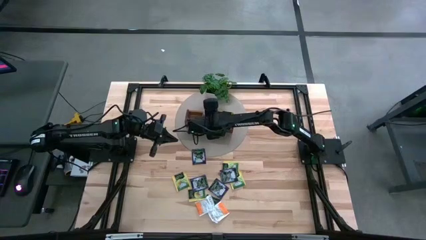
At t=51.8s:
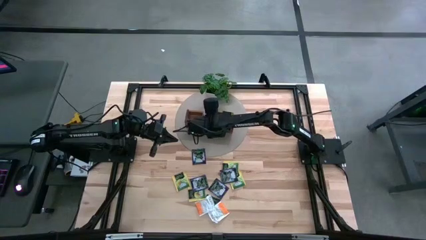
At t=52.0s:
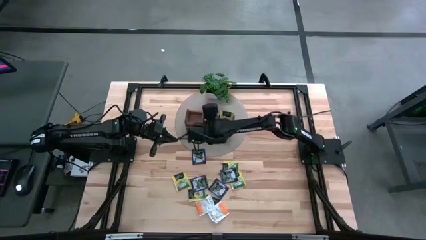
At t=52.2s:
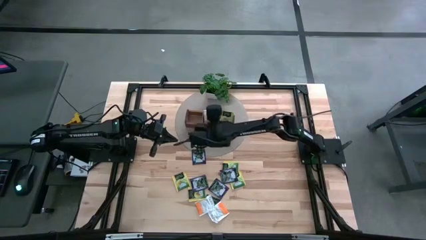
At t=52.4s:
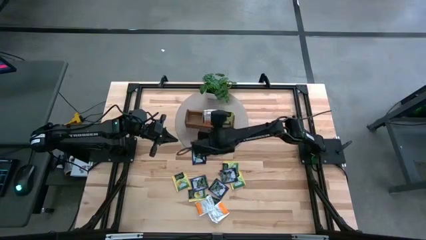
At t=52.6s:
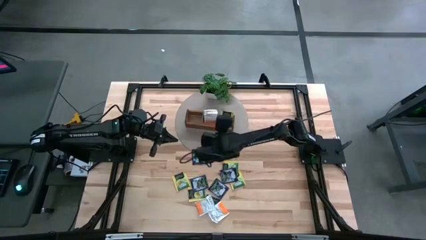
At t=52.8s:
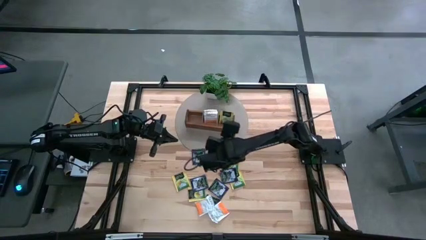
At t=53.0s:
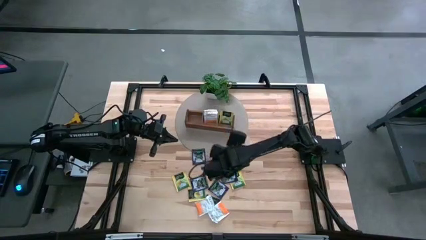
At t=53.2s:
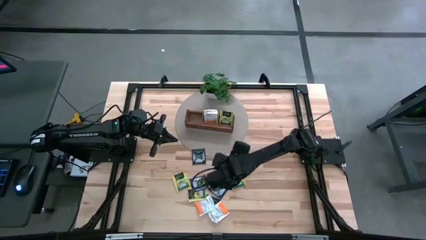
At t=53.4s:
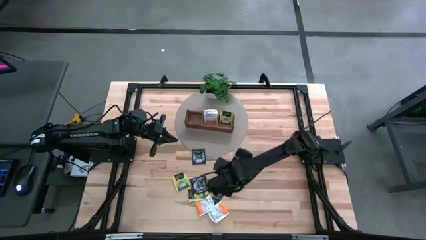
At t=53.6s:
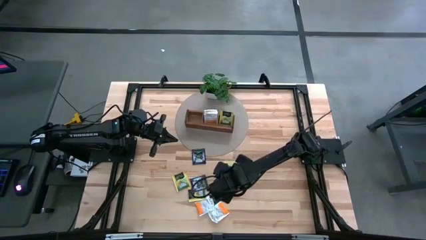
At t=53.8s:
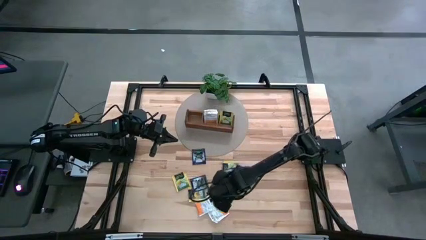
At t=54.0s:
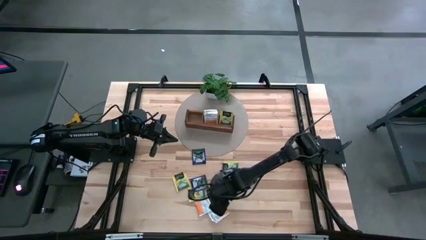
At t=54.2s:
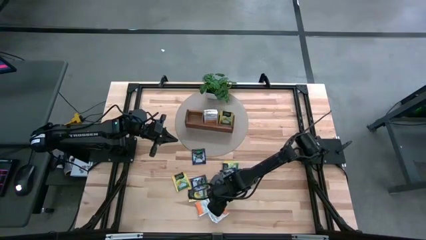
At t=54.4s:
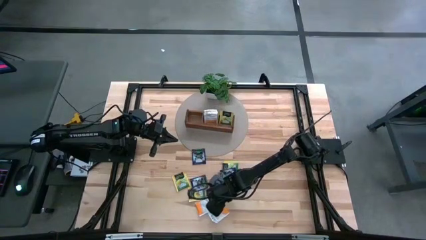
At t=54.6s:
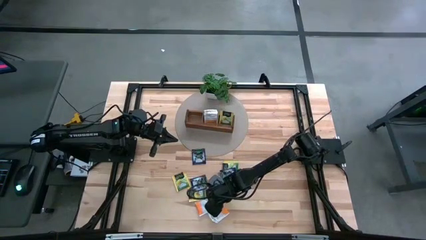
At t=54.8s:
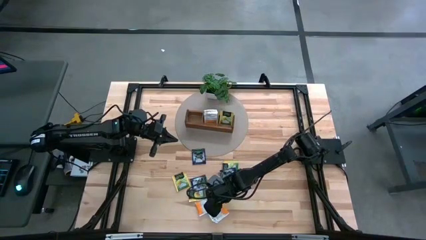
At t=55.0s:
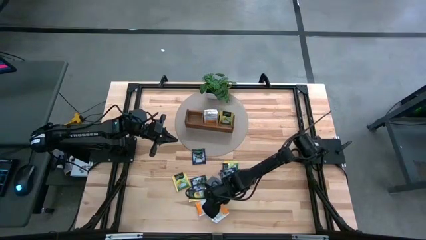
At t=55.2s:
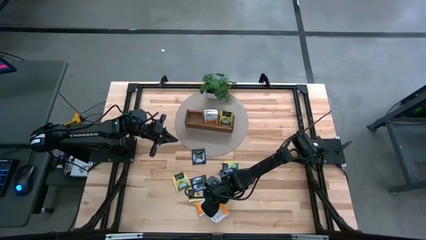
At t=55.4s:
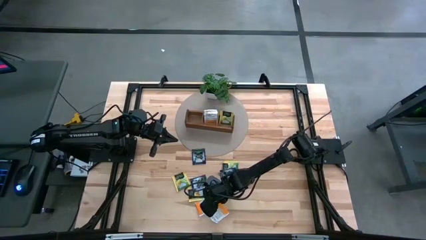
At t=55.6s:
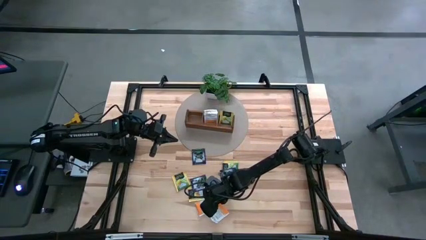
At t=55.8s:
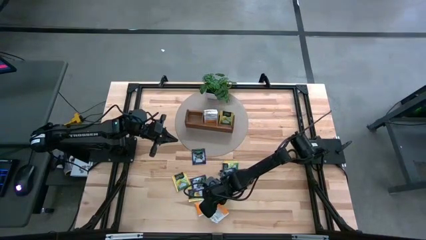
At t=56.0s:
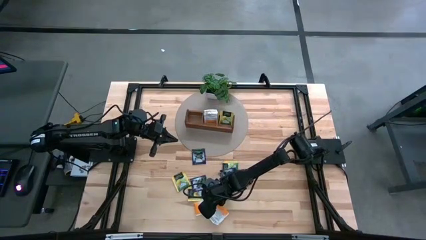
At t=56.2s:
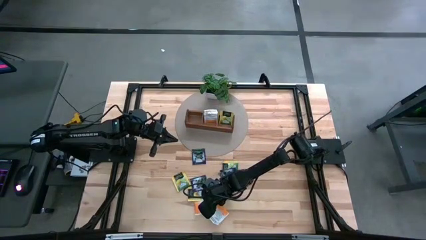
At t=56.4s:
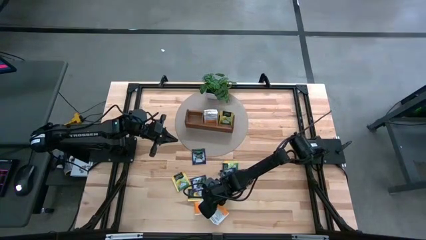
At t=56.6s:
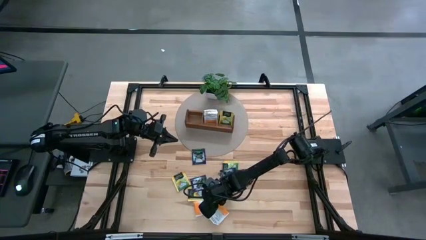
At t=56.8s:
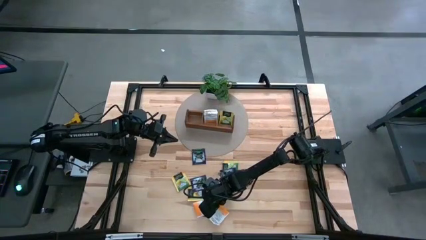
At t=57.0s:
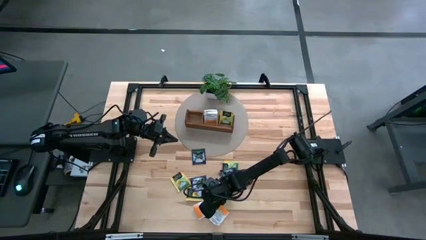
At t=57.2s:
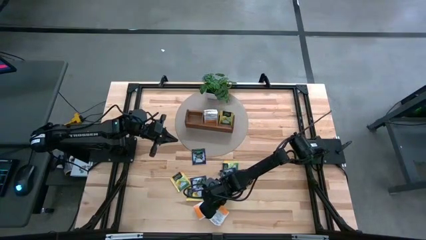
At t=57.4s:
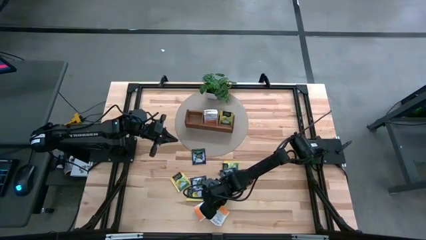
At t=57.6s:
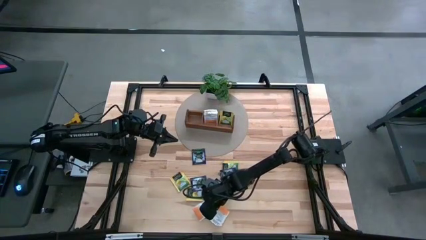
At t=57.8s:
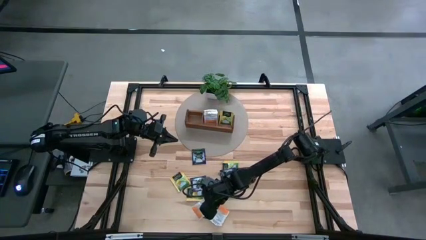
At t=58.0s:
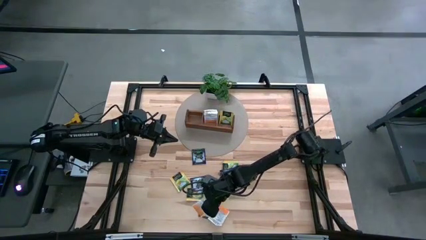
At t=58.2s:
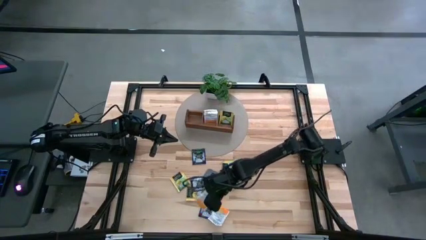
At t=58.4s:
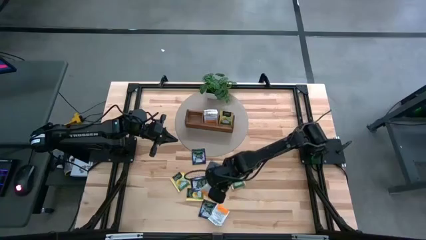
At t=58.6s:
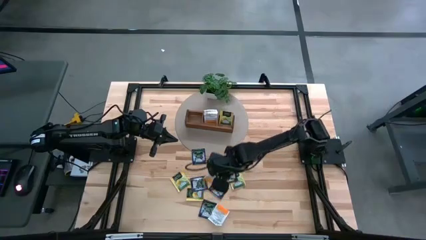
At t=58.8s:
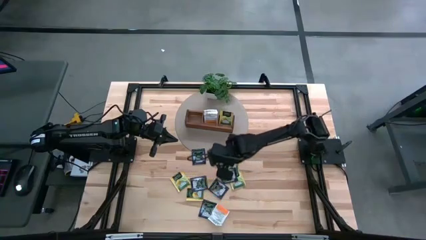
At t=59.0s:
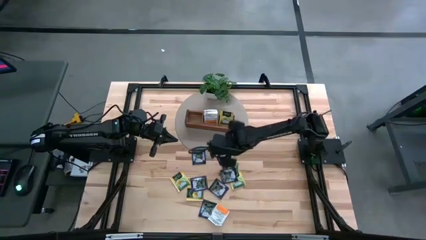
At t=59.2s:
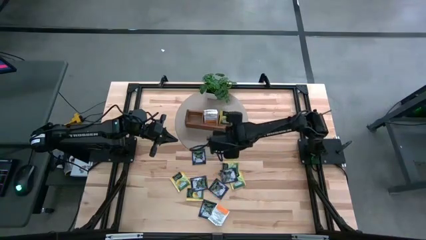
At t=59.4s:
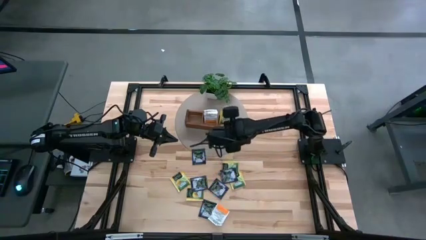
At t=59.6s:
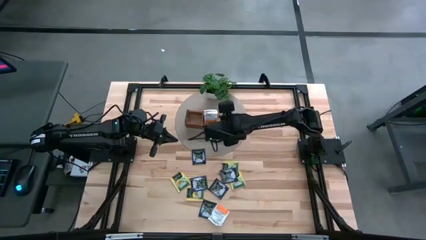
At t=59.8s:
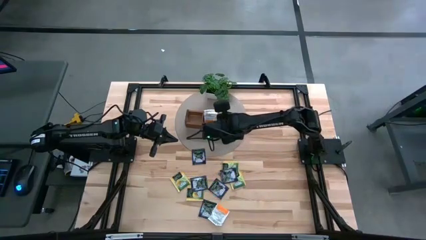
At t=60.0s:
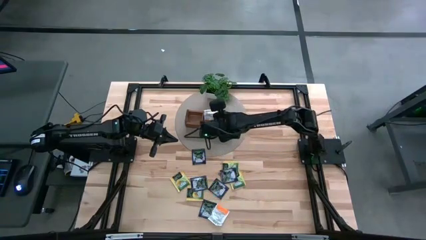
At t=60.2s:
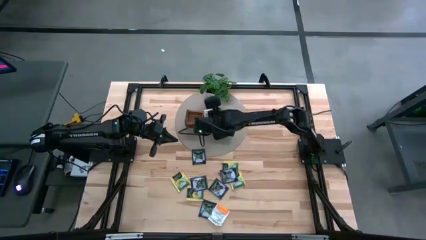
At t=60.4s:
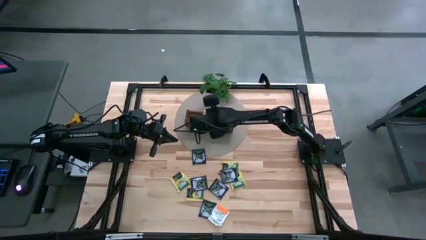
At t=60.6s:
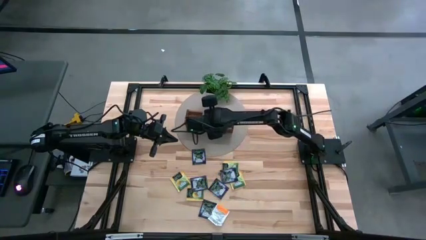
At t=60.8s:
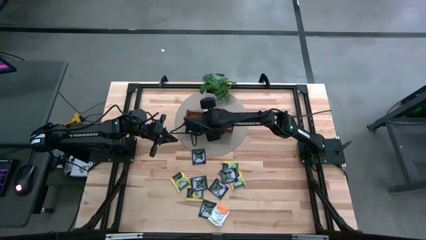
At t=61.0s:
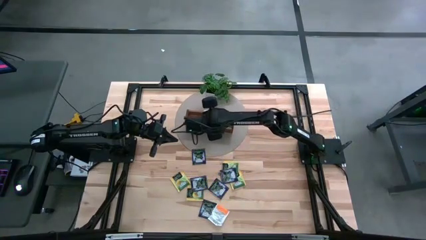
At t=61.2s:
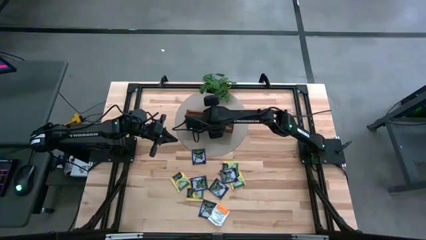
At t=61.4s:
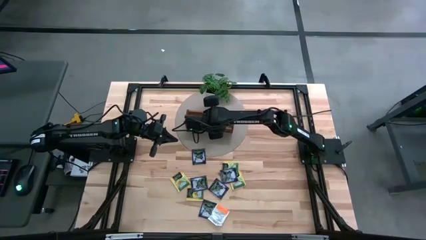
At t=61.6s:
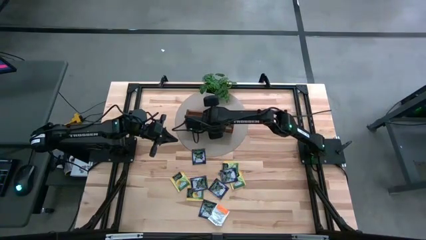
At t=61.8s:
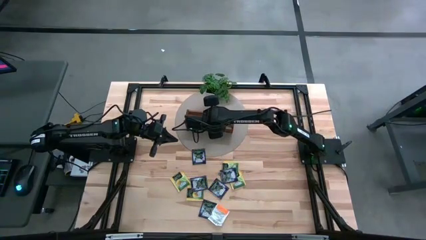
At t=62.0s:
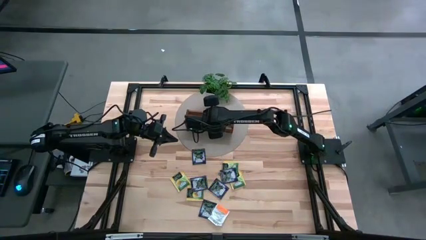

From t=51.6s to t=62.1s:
Task: Pick & Place Tea
Put the top white tea bag in the middle section of the wooden organizer

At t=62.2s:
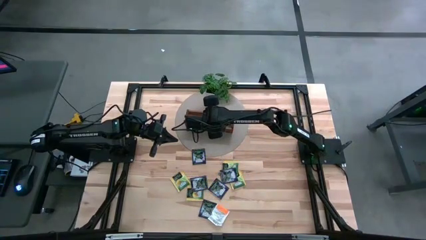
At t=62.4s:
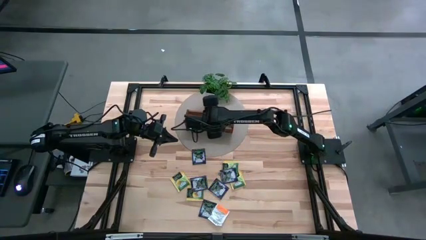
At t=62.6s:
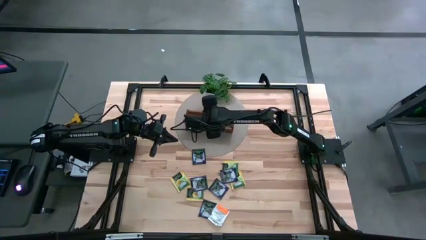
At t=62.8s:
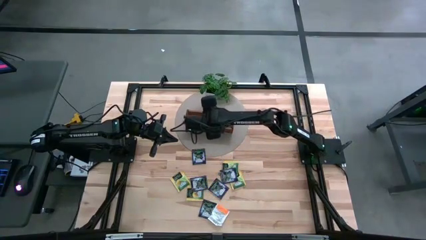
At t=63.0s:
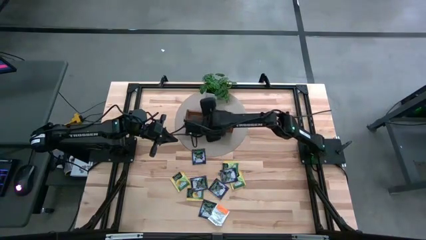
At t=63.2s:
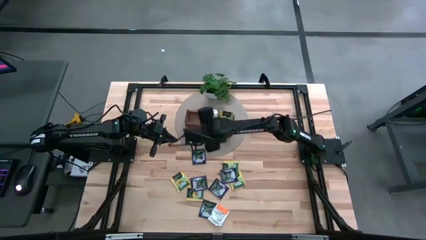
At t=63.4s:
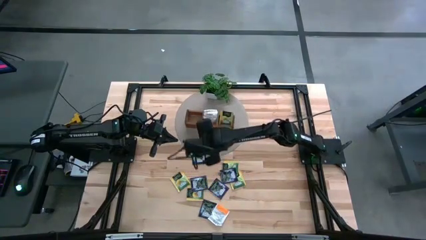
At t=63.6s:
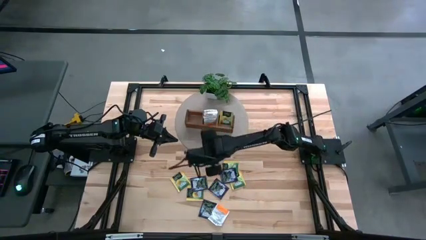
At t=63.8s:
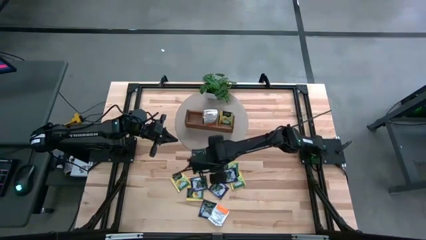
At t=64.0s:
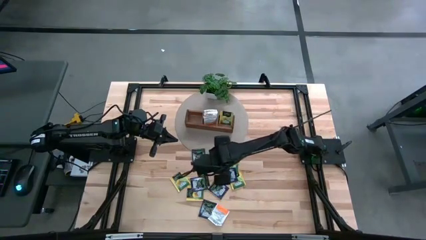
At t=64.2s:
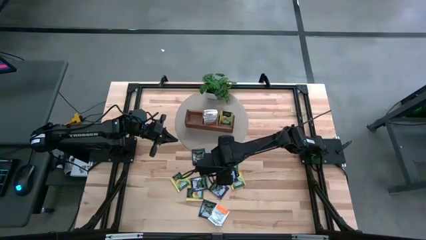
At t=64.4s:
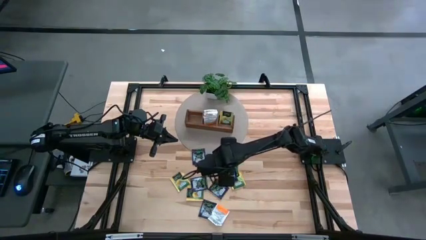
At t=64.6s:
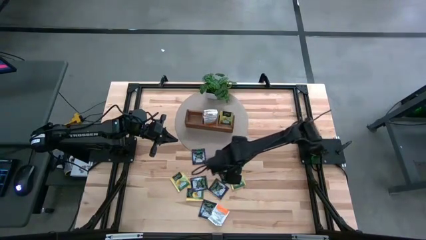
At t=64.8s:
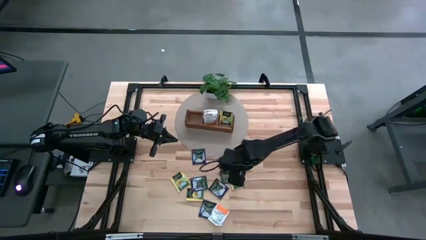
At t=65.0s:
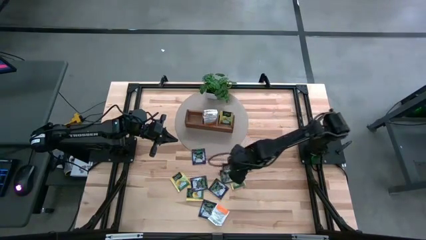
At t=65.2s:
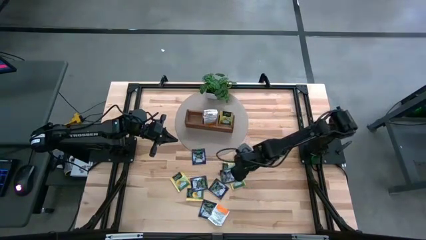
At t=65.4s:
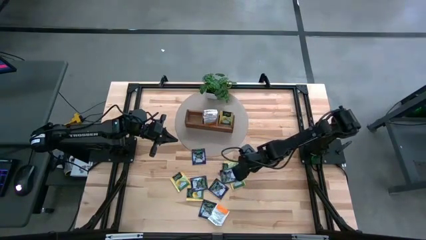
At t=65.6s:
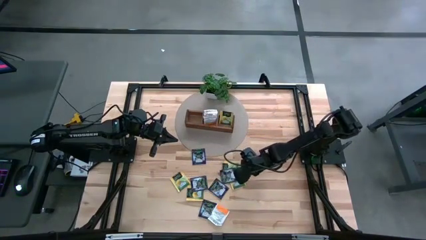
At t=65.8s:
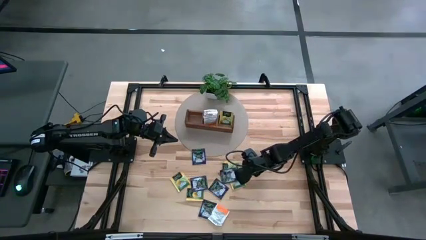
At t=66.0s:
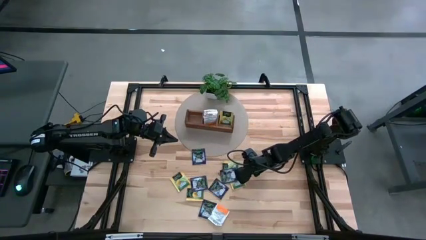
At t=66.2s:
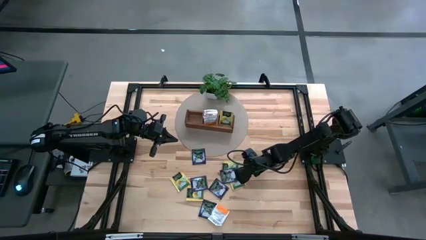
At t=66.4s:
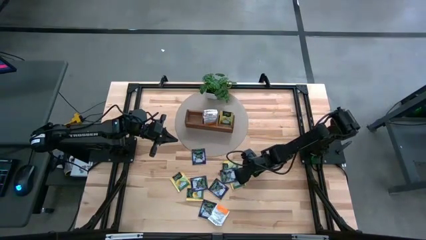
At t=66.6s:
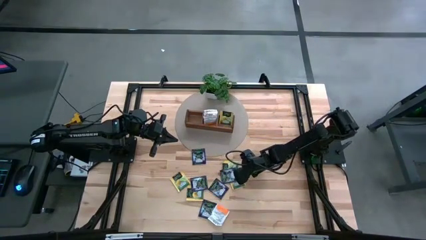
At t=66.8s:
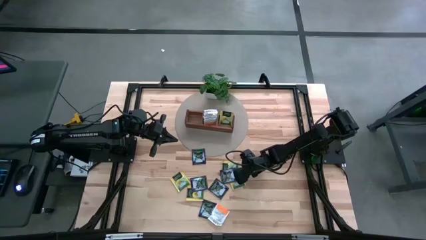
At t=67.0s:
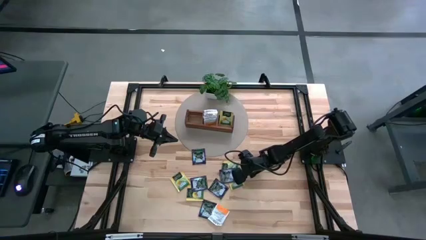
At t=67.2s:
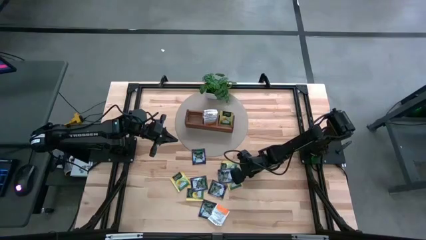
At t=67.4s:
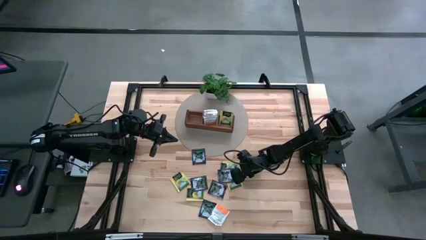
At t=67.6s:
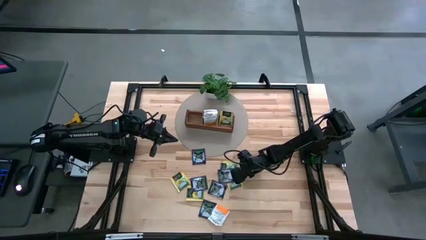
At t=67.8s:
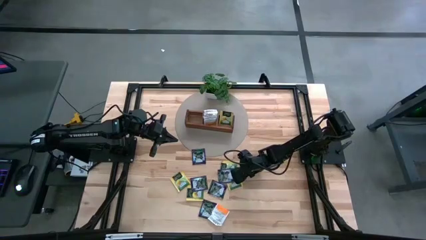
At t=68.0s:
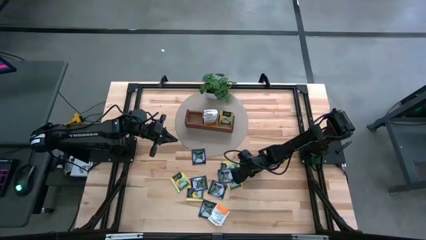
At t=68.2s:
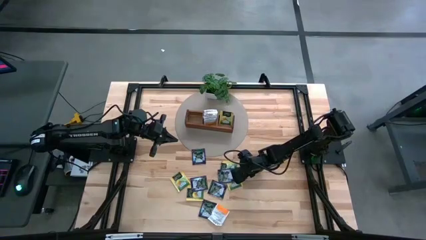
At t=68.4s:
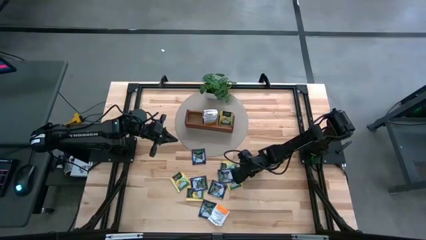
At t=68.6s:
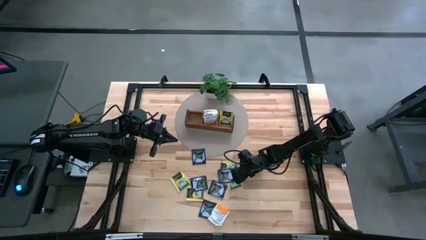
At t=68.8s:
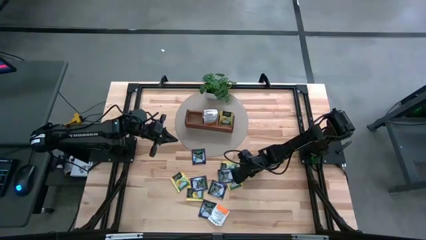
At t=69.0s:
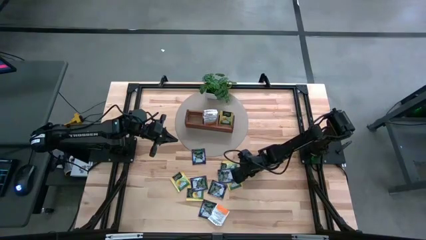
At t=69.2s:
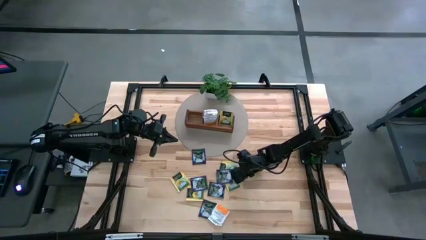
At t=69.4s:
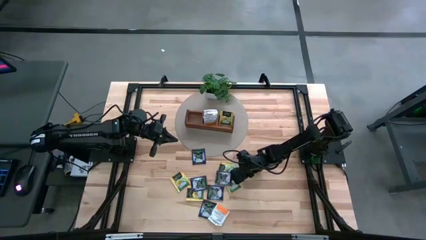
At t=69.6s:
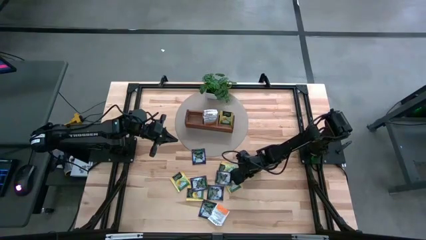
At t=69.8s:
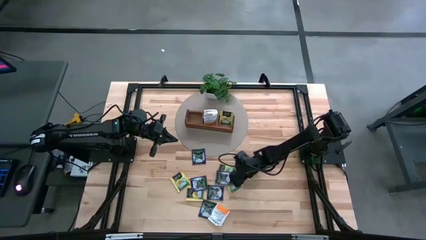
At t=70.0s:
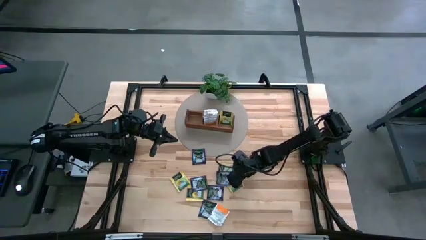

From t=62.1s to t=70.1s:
Put the yellow tea bag into the right section of the wooden organizer
